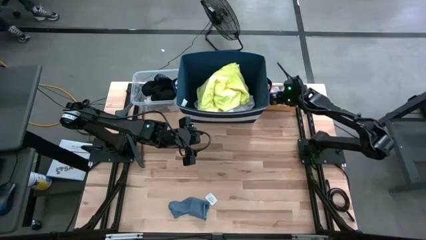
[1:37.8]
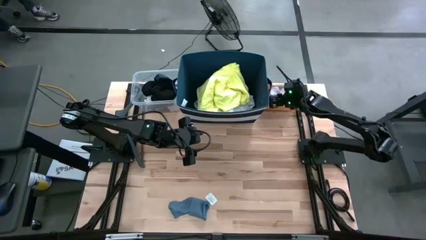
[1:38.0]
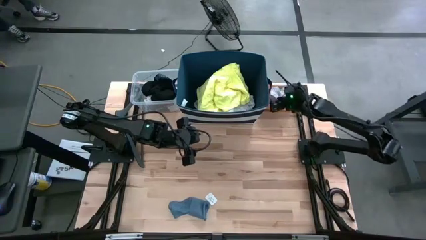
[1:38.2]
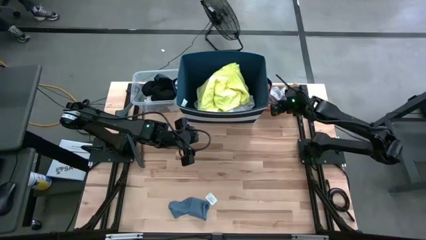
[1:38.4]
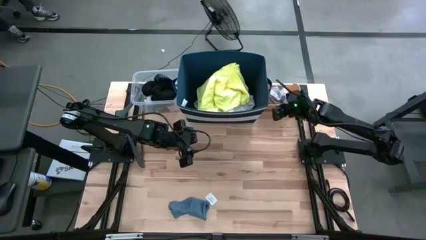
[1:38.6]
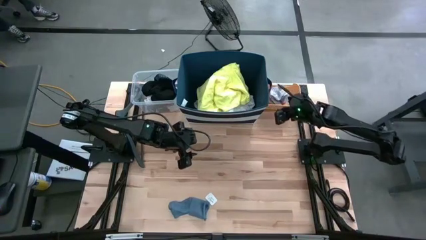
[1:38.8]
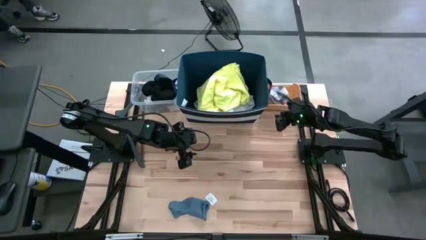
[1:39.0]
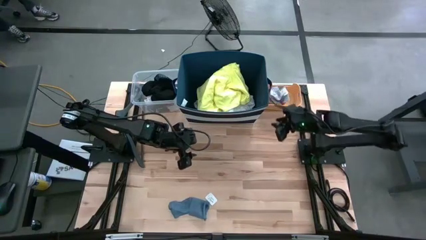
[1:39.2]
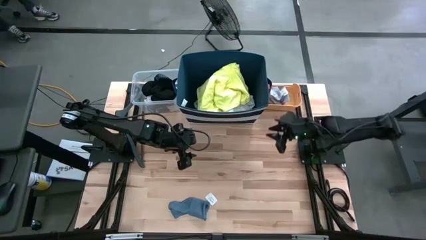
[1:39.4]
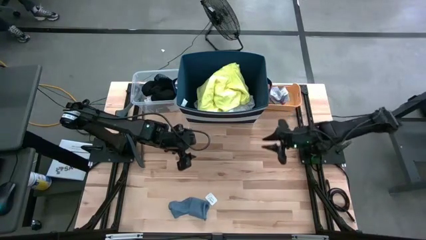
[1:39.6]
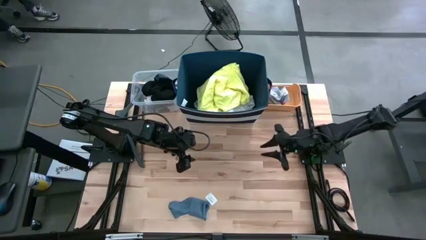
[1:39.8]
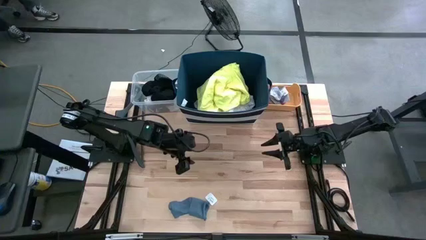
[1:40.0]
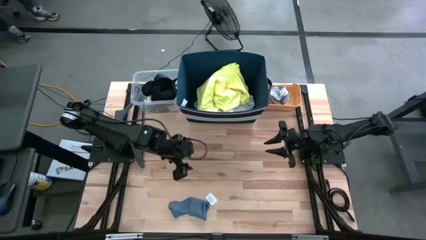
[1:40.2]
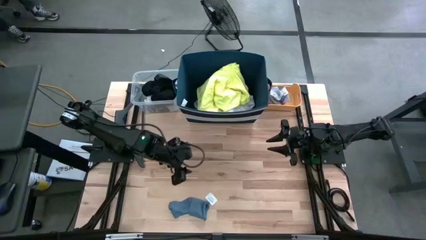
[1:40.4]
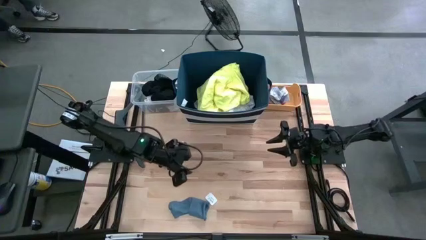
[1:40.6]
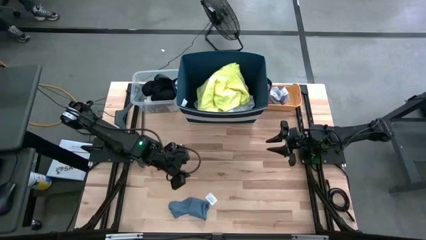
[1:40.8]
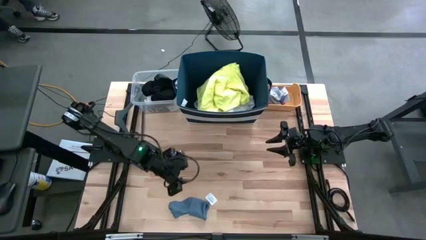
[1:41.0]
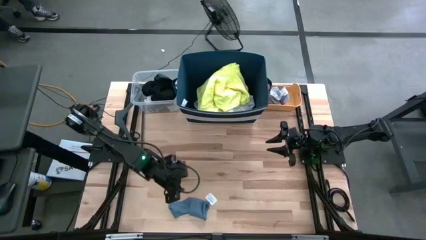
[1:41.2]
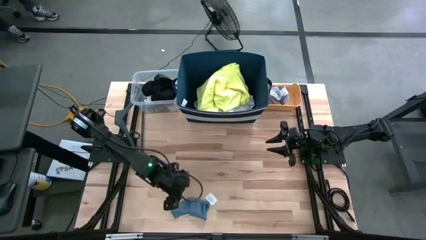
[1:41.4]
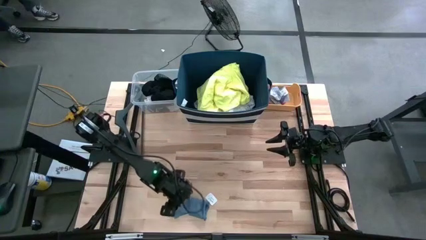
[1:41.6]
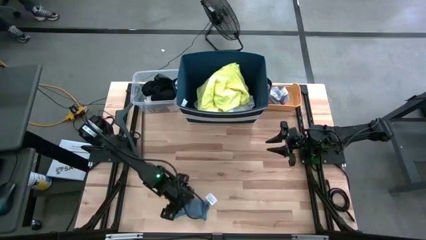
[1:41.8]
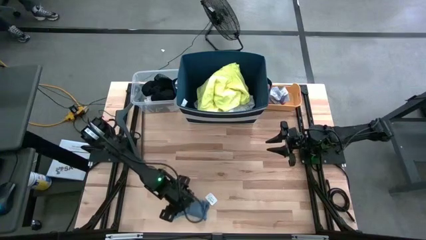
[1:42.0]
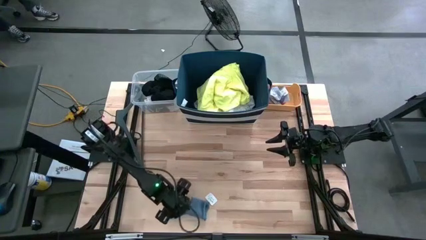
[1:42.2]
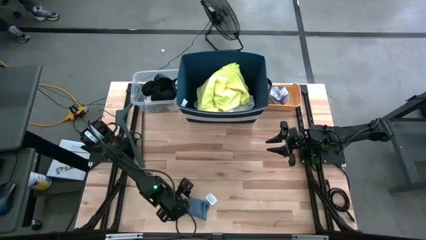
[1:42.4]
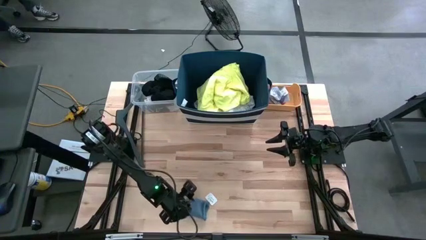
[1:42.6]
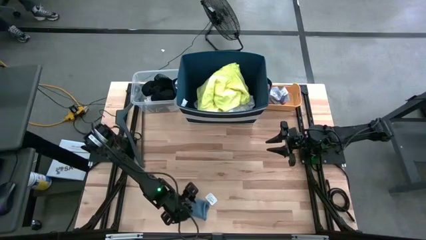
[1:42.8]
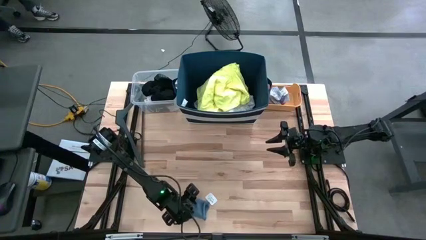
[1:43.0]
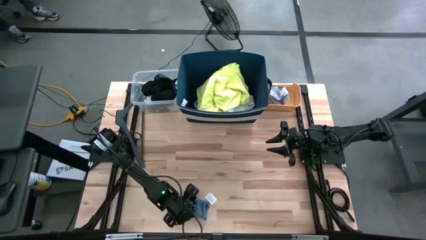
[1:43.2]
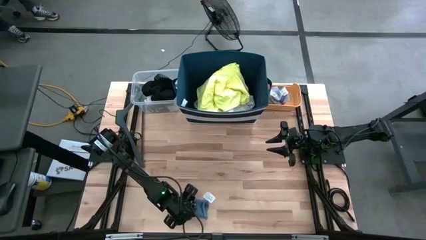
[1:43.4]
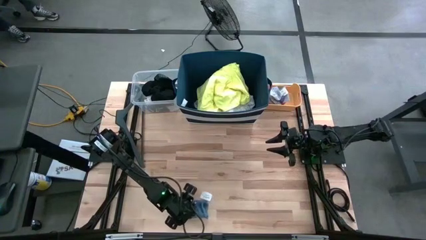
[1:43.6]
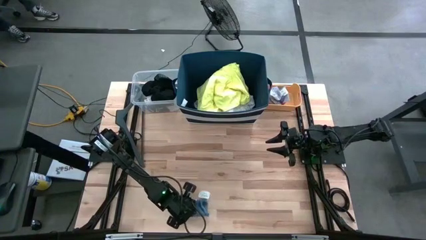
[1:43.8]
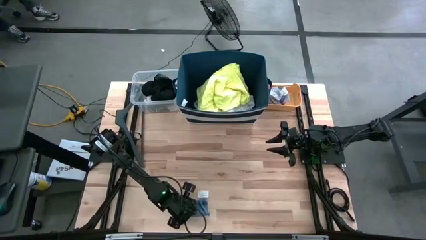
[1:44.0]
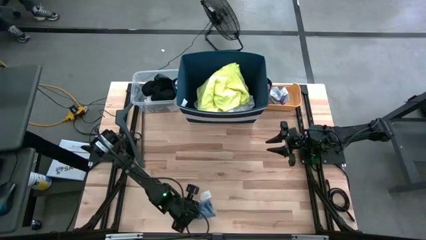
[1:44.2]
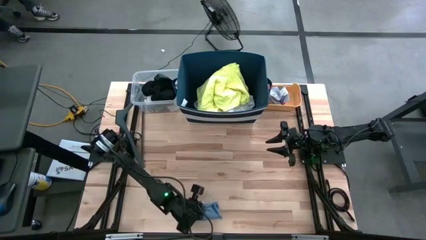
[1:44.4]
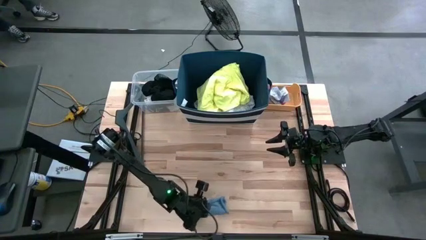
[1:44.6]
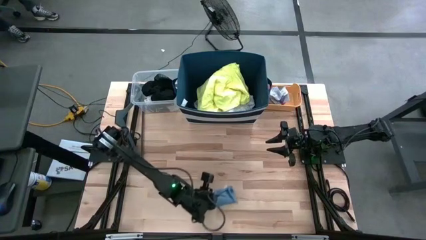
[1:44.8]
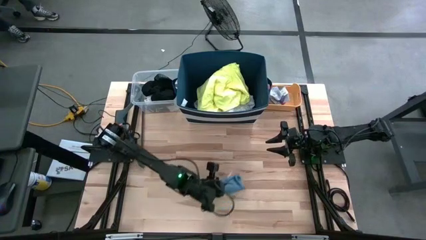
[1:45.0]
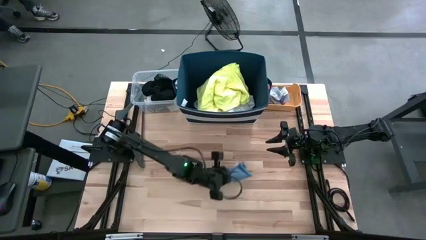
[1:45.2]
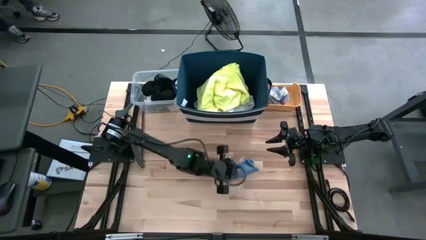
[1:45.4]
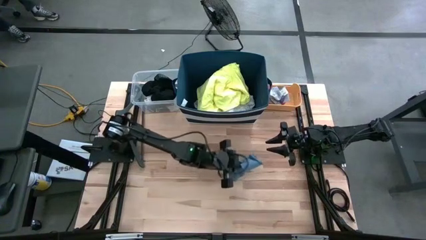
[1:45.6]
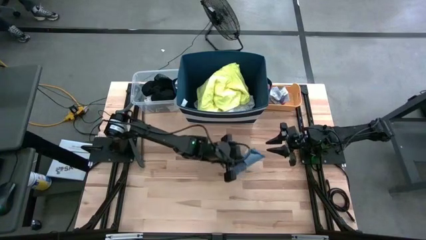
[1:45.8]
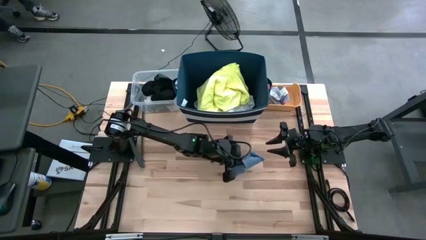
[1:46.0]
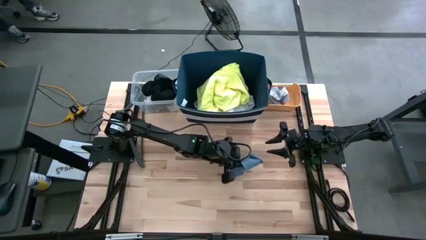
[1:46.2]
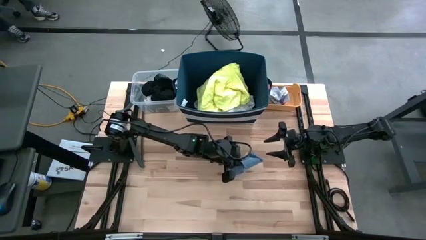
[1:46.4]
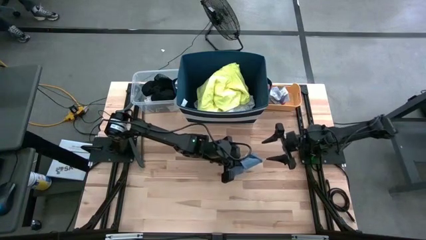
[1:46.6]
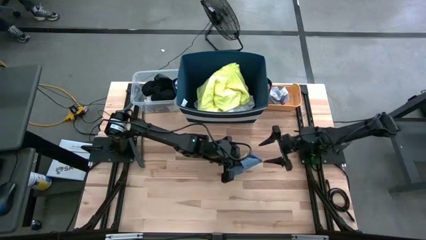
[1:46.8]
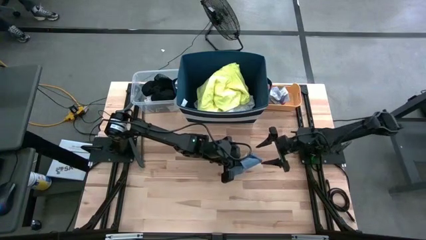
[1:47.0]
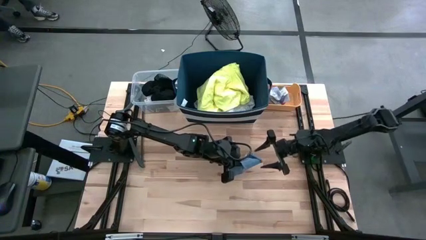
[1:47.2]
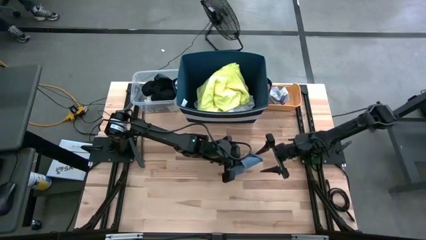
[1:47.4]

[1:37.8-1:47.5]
Task: Pick & Place Cloths
Put the blue sock into the yellow bin

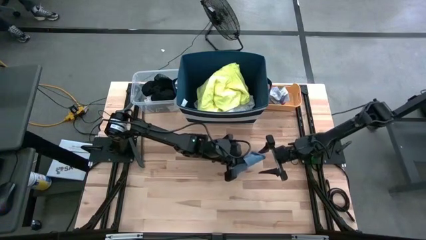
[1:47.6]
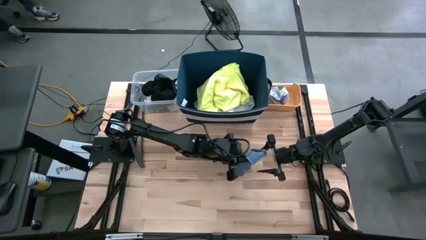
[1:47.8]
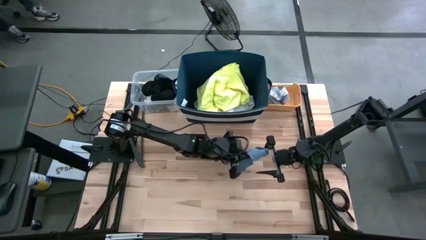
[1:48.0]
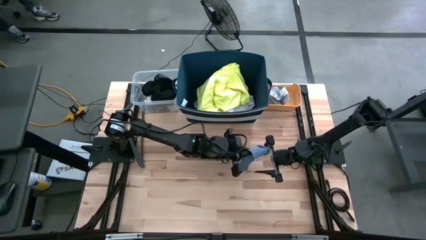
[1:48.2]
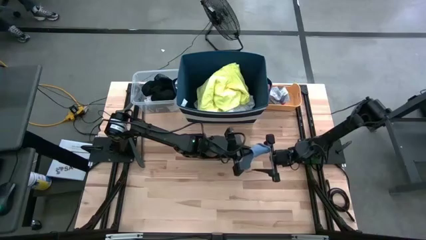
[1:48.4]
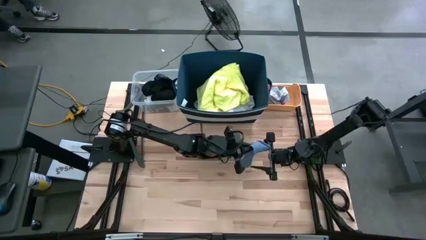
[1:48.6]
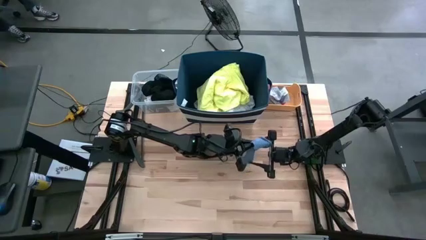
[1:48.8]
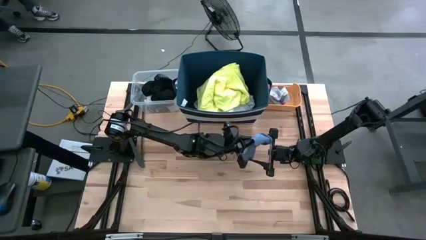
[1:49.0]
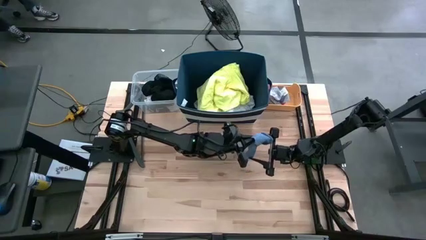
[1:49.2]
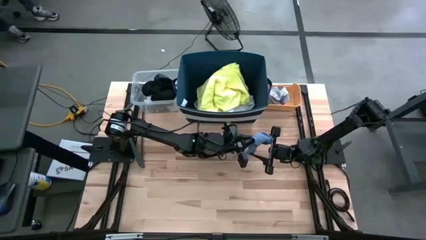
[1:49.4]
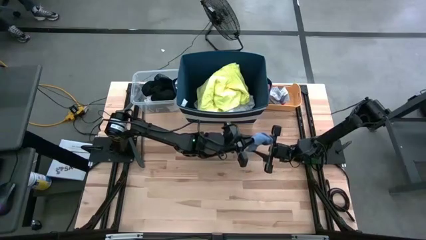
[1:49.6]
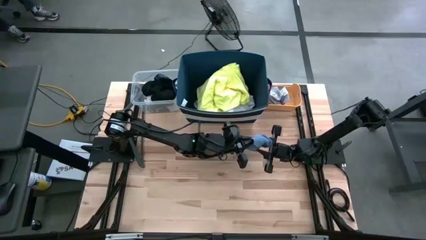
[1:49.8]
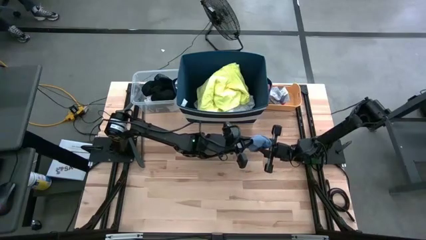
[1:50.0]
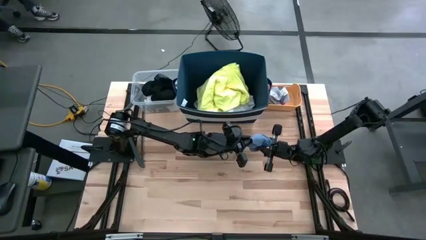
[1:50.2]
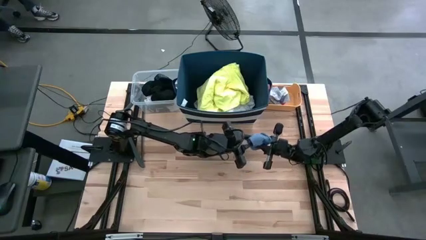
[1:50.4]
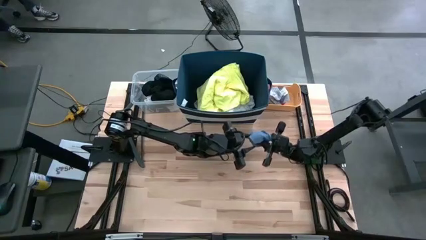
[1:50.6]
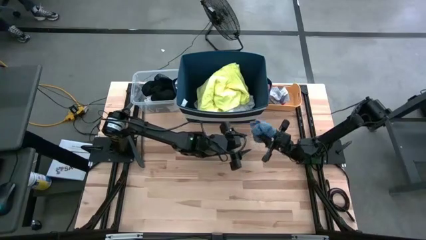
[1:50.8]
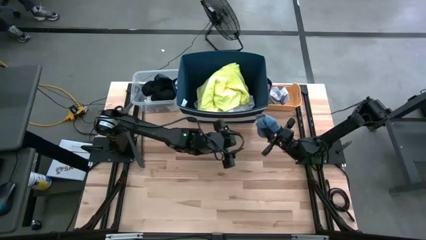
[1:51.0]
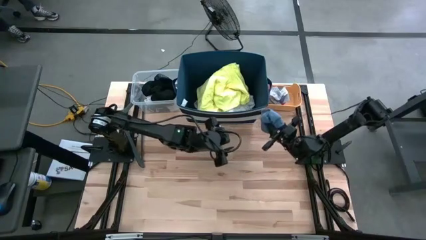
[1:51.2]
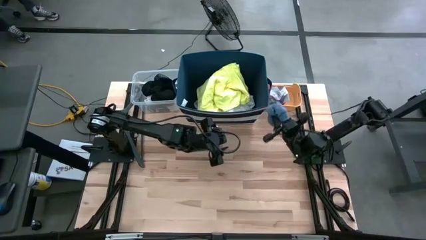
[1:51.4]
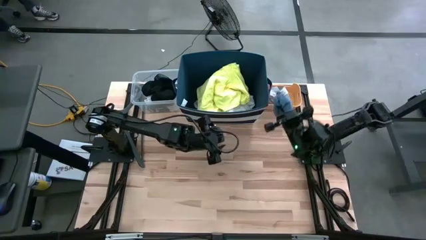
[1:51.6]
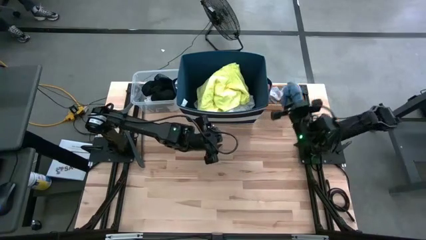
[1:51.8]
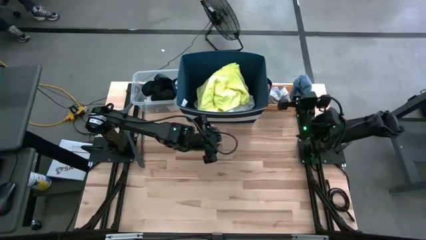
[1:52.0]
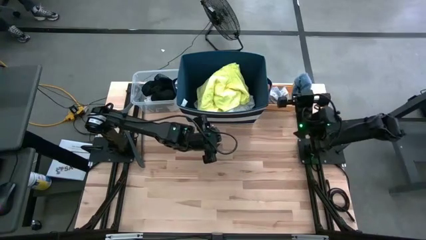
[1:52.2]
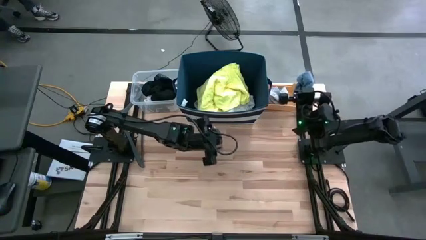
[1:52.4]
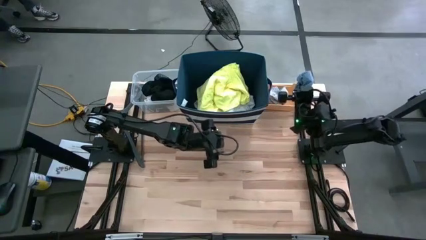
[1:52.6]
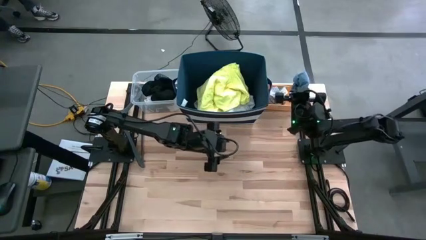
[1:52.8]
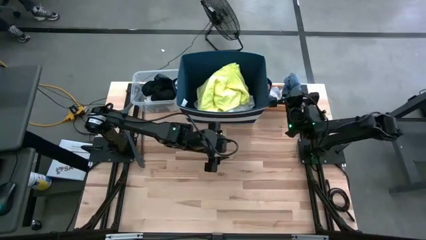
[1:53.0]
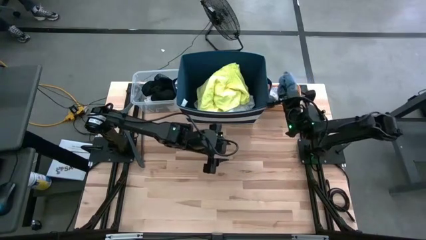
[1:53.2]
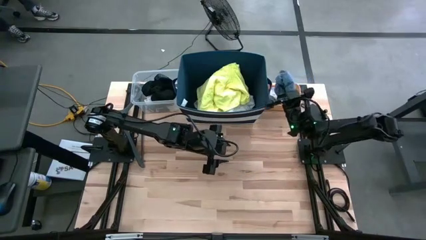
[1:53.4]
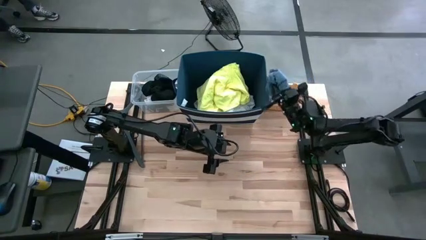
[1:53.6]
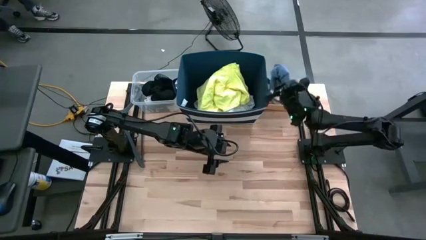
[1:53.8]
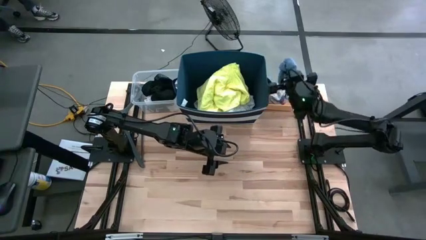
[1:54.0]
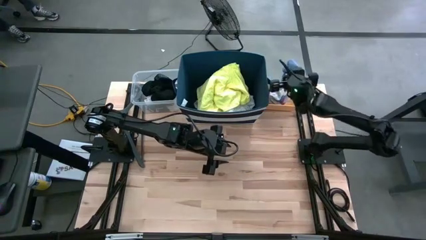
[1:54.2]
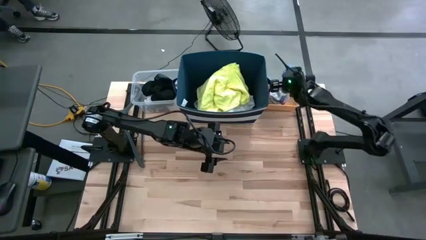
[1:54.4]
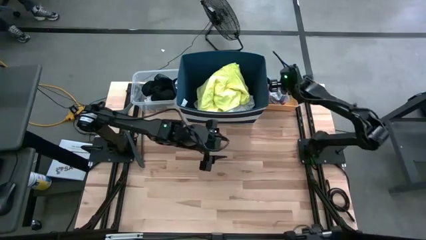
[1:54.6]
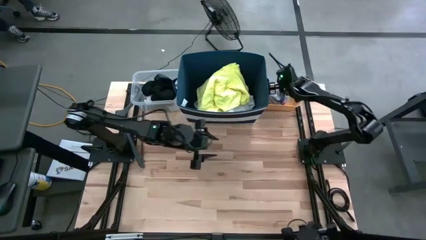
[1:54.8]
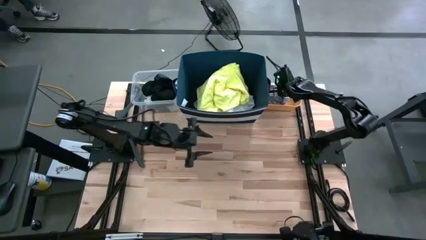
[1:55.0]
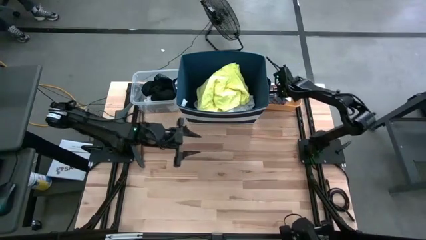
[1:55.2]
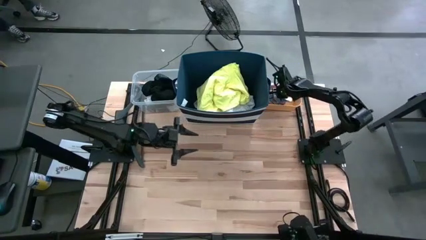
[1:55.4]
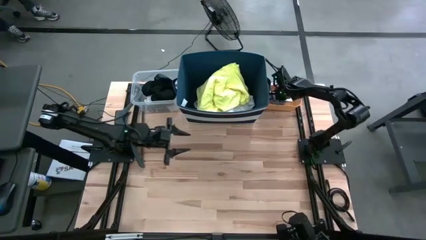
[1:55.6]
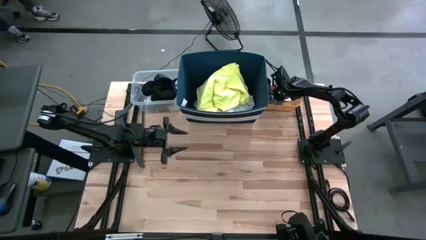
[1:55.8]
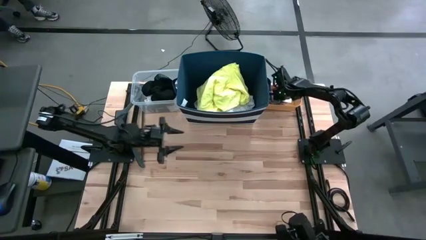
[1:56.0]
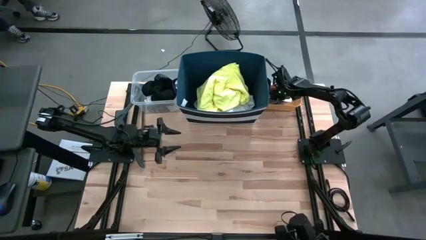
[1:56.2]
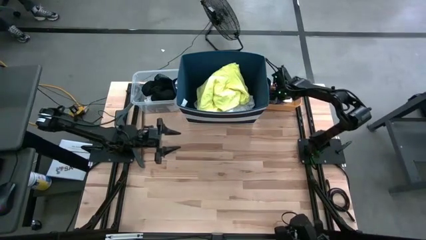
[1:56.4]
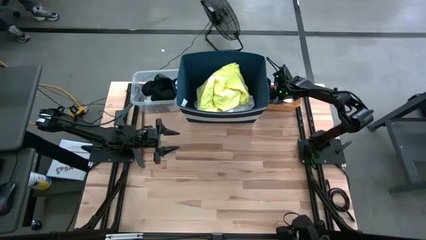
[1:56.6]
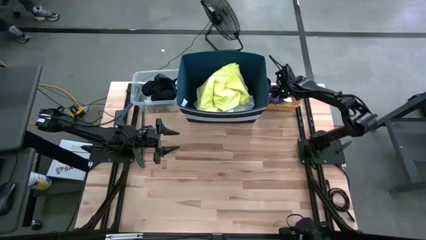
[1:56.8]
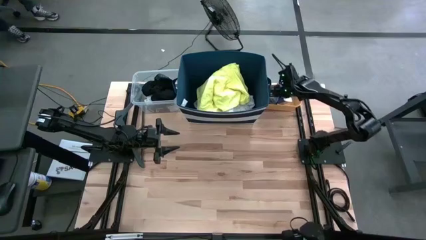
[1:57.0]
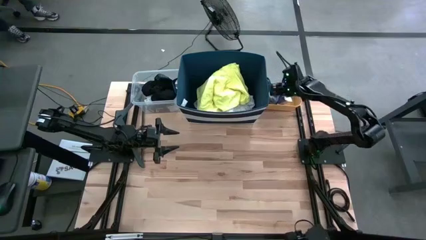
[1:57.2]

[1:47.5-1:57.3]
Put the blue sock into the yellow bin
